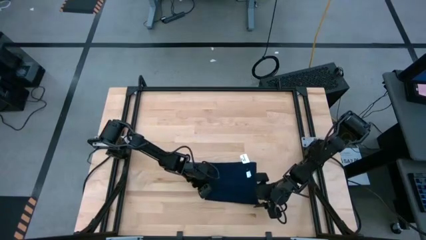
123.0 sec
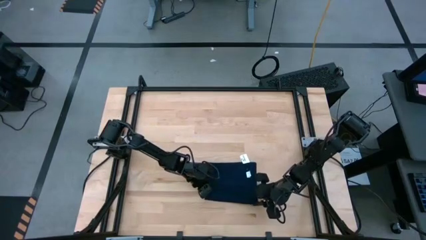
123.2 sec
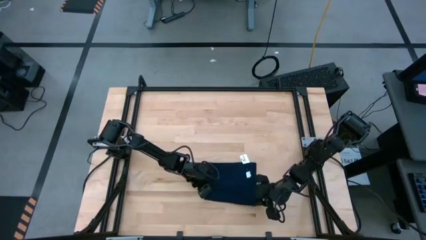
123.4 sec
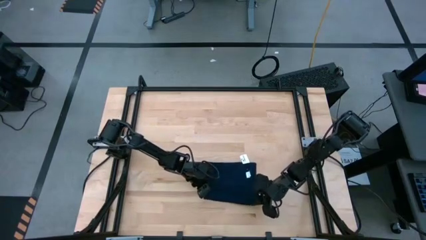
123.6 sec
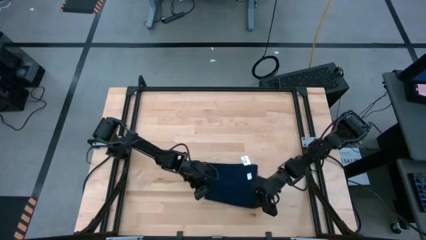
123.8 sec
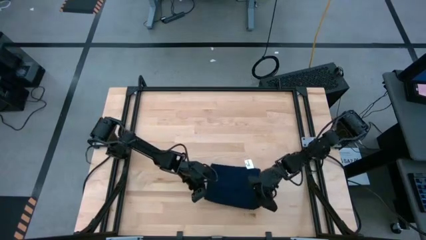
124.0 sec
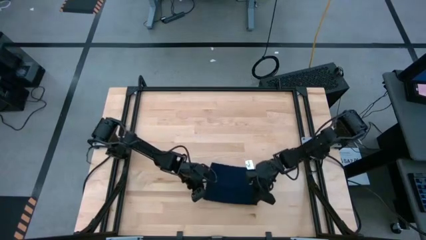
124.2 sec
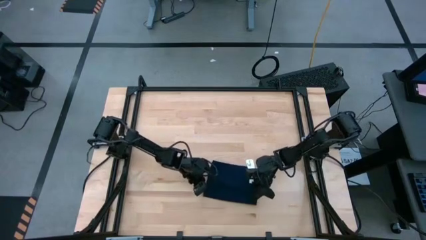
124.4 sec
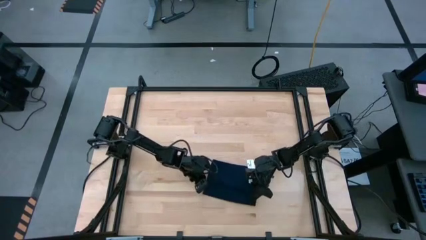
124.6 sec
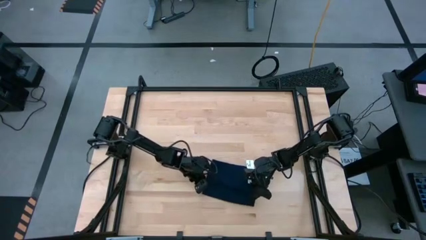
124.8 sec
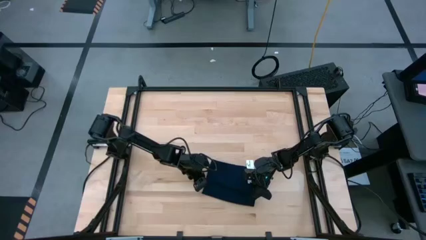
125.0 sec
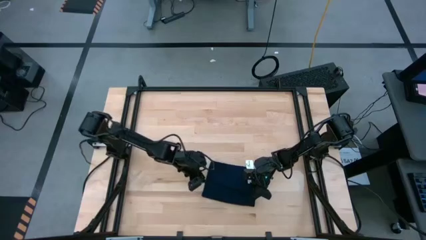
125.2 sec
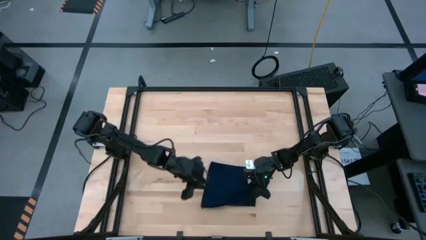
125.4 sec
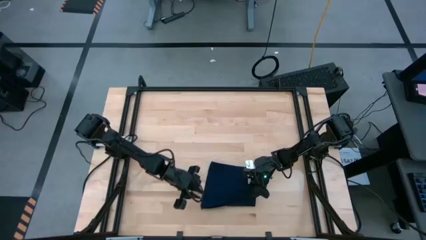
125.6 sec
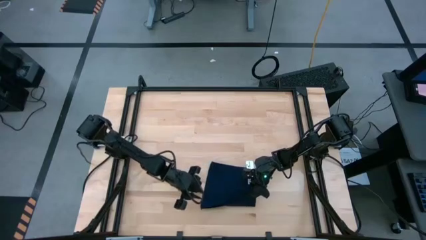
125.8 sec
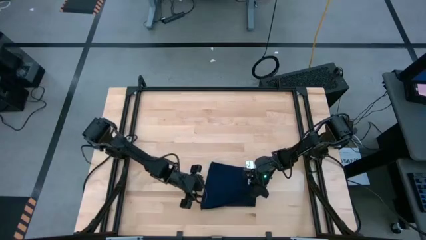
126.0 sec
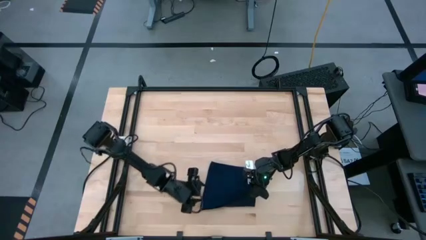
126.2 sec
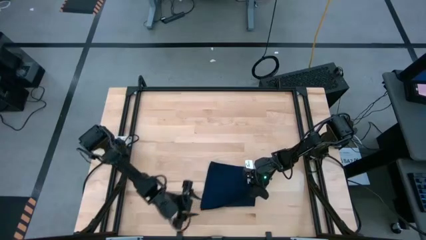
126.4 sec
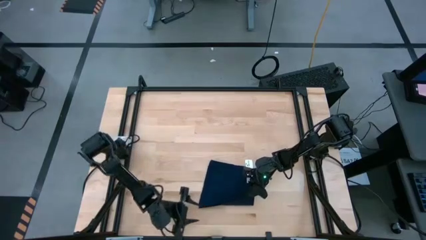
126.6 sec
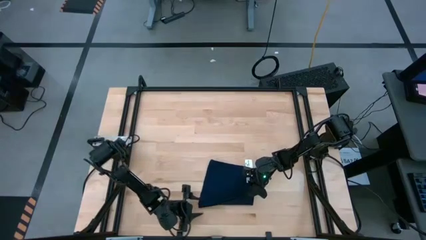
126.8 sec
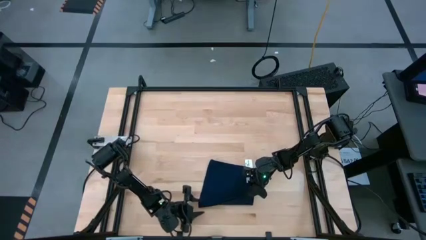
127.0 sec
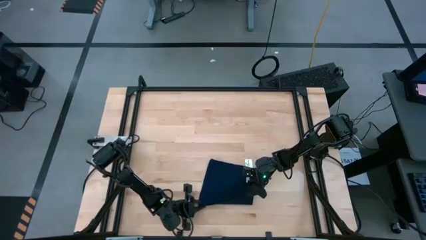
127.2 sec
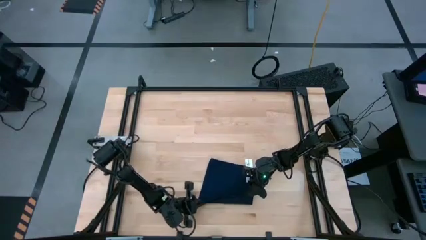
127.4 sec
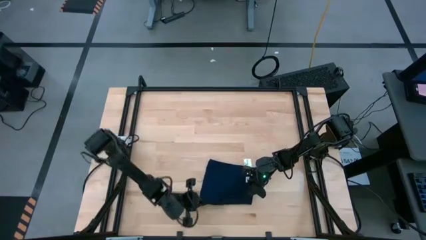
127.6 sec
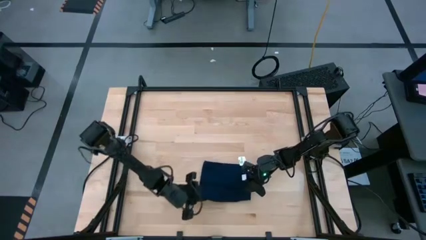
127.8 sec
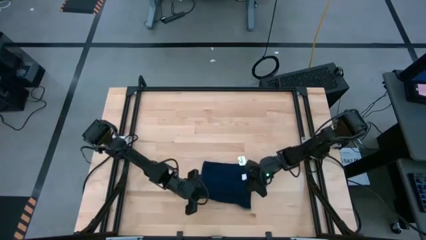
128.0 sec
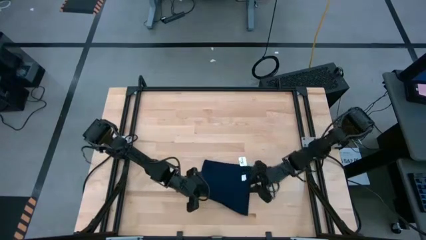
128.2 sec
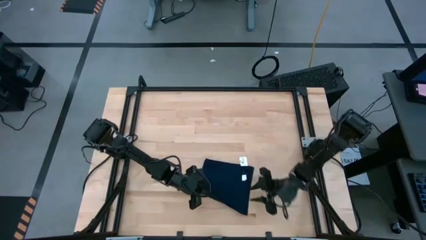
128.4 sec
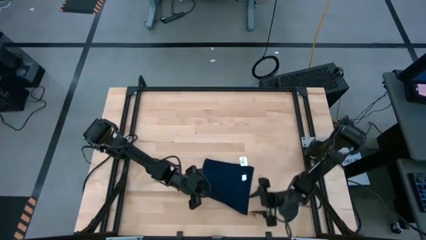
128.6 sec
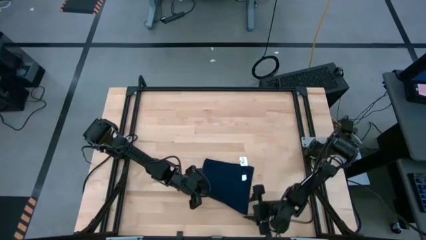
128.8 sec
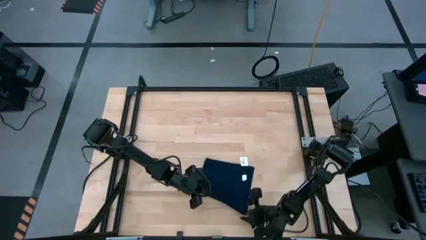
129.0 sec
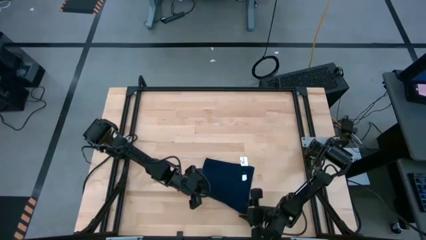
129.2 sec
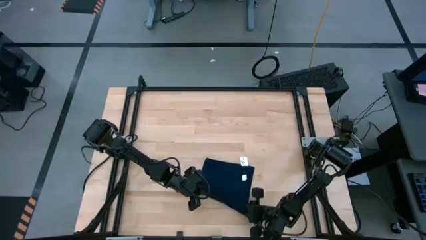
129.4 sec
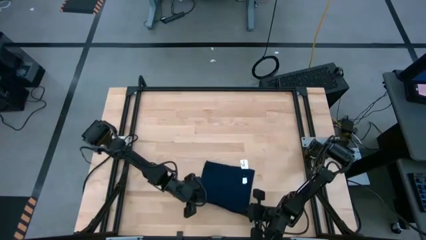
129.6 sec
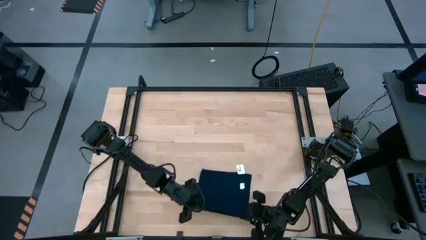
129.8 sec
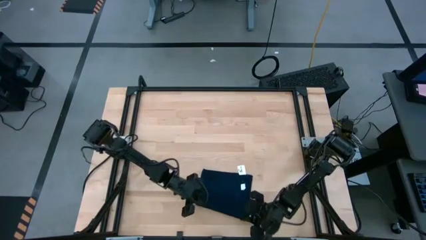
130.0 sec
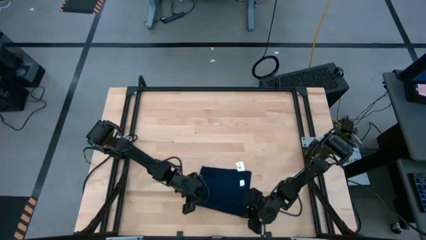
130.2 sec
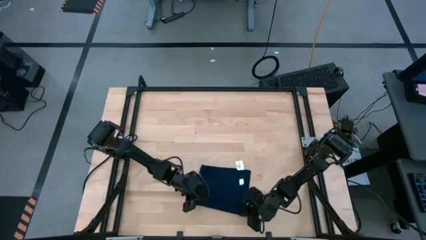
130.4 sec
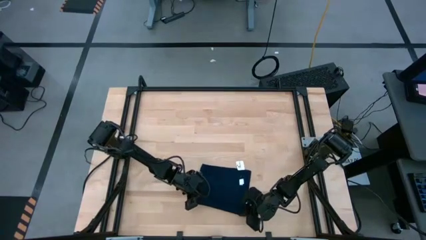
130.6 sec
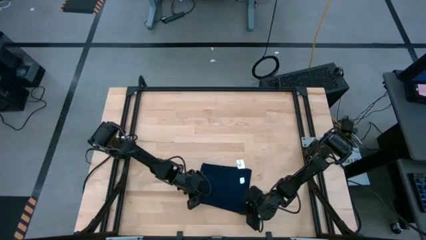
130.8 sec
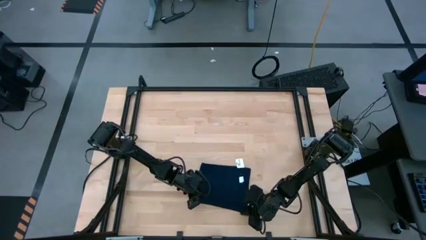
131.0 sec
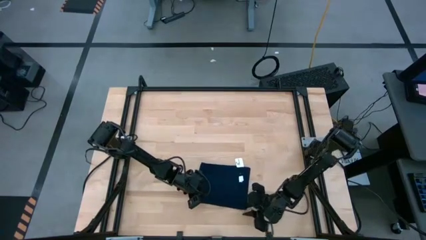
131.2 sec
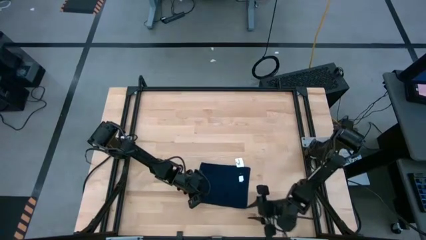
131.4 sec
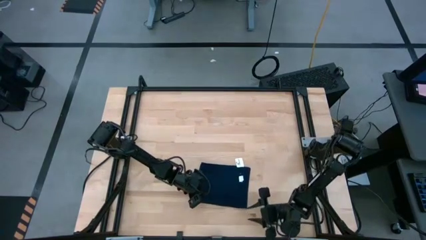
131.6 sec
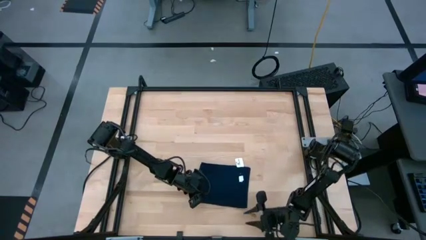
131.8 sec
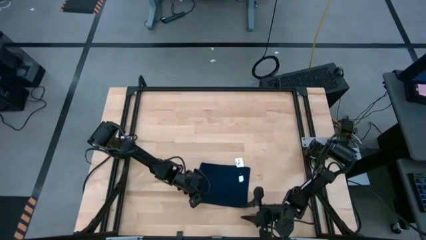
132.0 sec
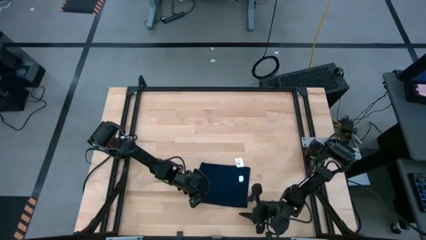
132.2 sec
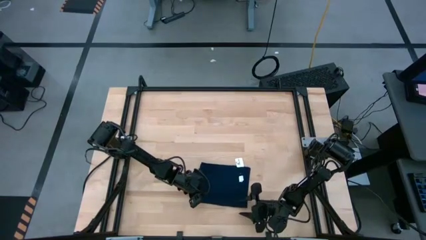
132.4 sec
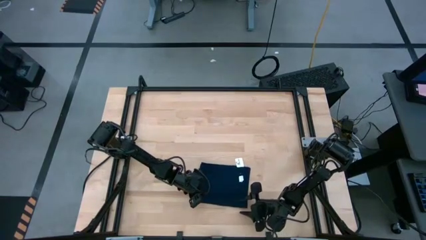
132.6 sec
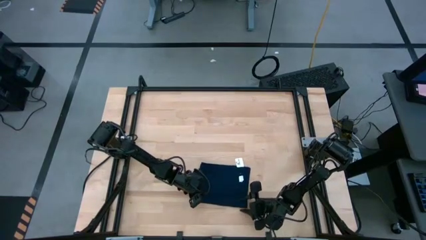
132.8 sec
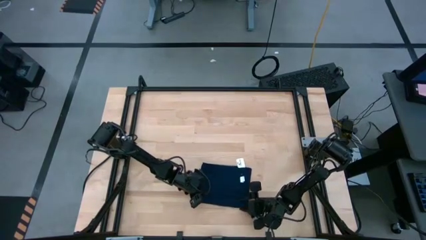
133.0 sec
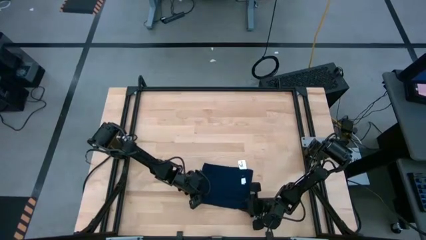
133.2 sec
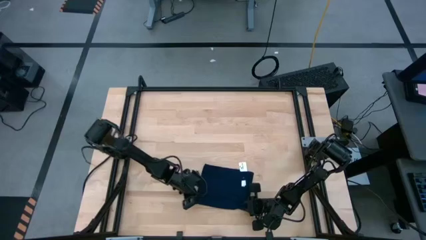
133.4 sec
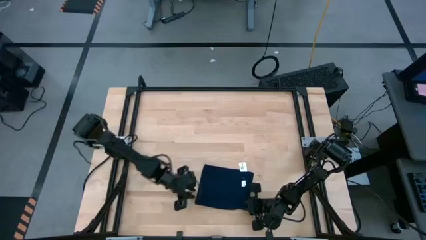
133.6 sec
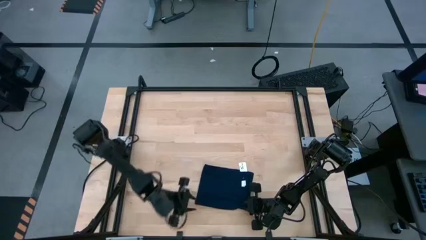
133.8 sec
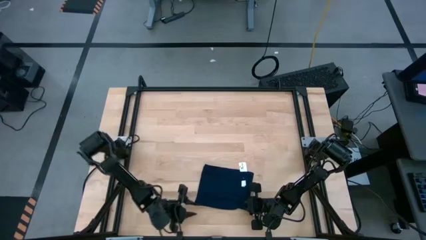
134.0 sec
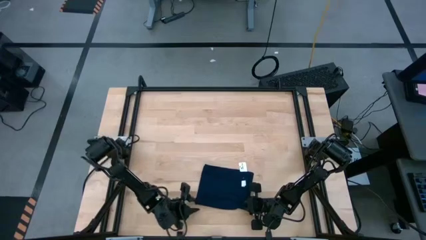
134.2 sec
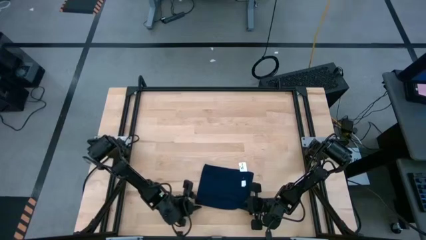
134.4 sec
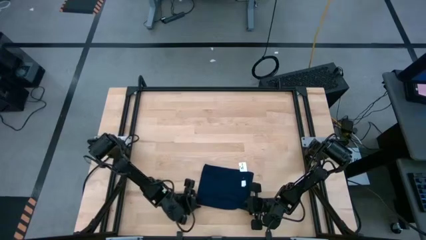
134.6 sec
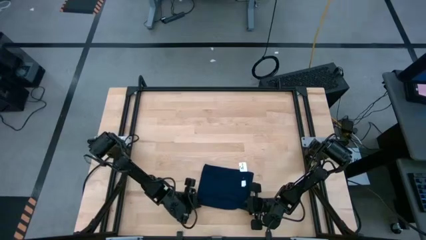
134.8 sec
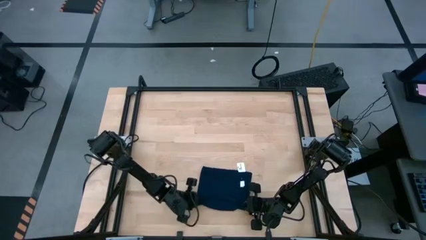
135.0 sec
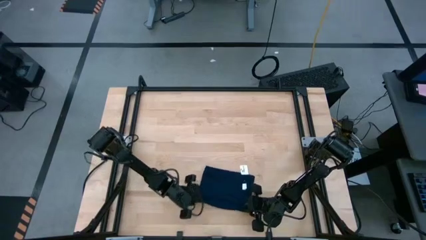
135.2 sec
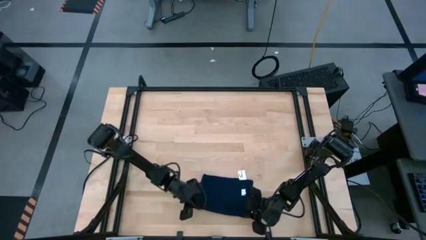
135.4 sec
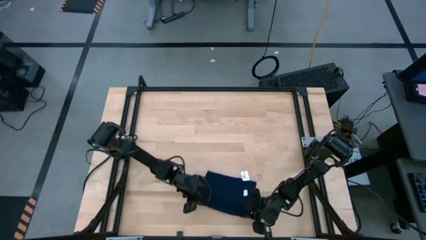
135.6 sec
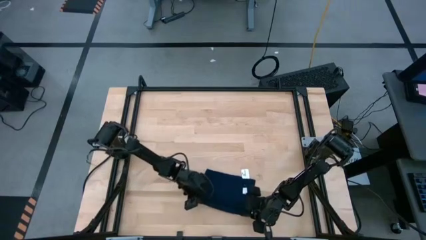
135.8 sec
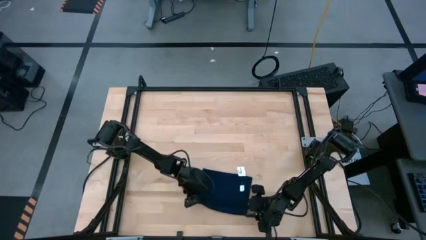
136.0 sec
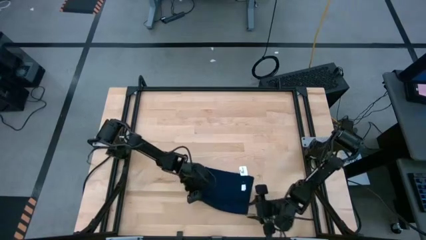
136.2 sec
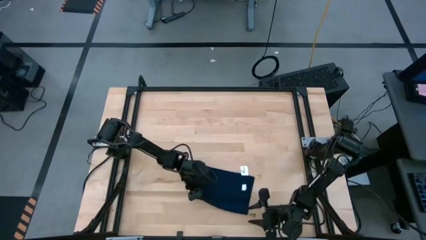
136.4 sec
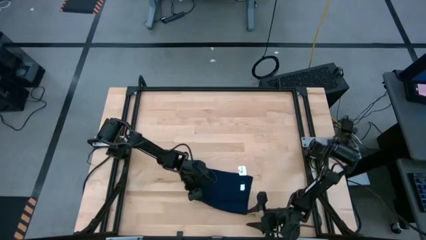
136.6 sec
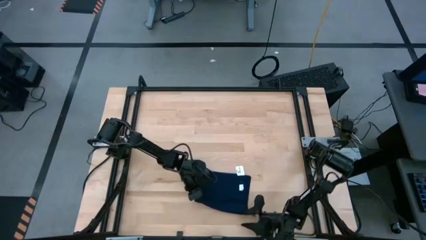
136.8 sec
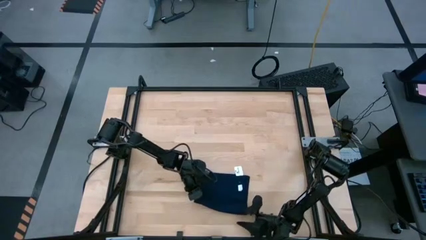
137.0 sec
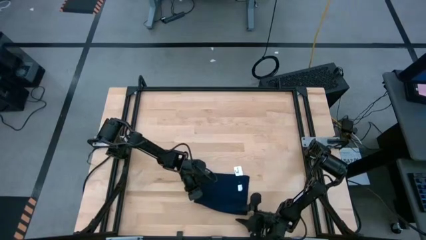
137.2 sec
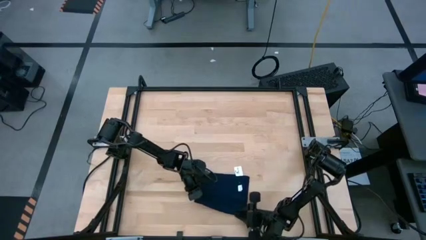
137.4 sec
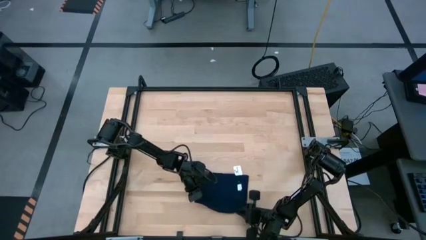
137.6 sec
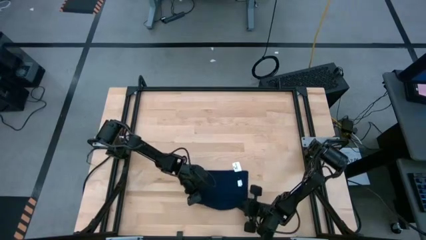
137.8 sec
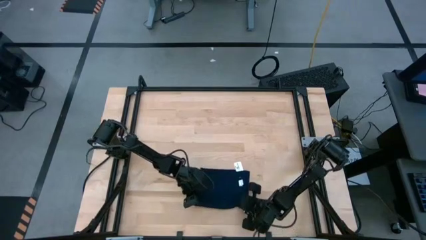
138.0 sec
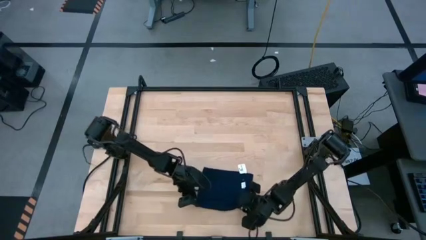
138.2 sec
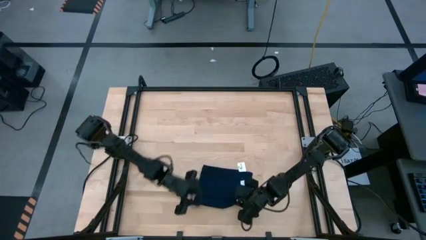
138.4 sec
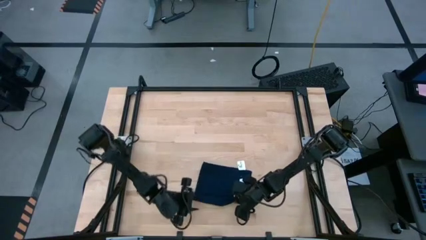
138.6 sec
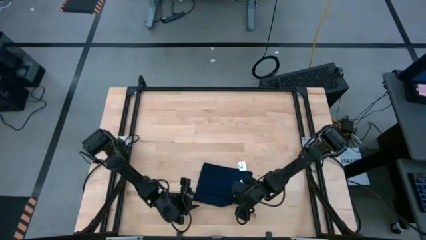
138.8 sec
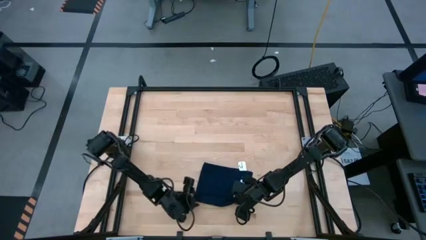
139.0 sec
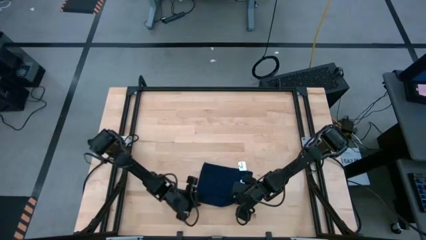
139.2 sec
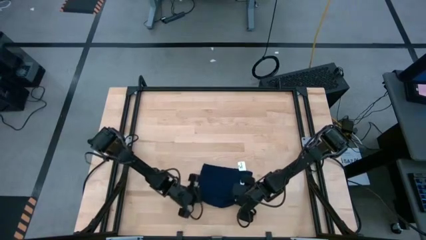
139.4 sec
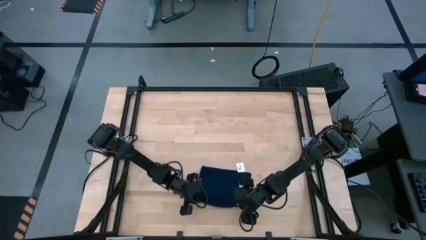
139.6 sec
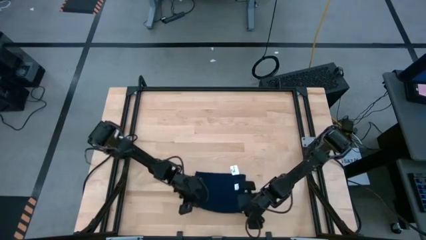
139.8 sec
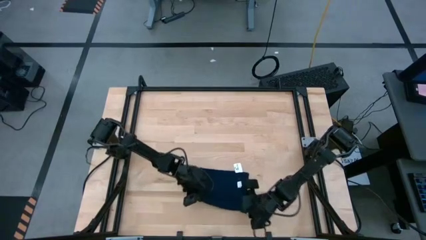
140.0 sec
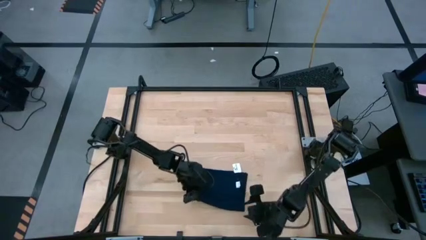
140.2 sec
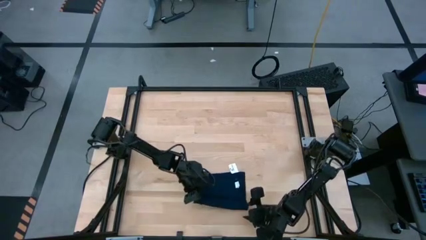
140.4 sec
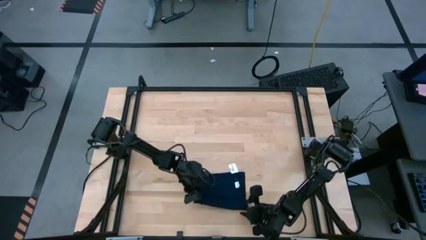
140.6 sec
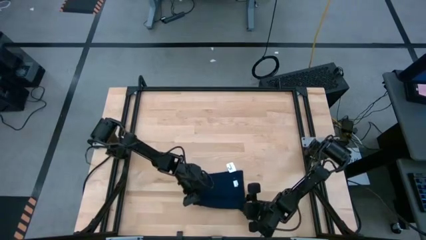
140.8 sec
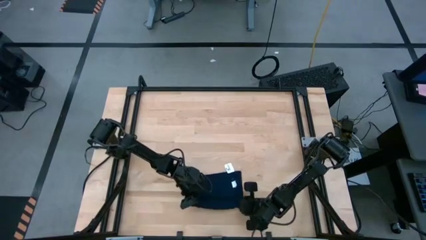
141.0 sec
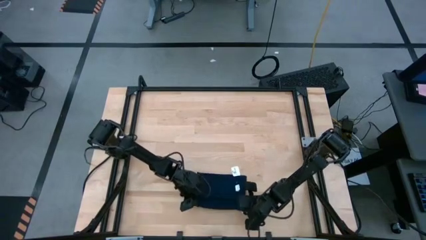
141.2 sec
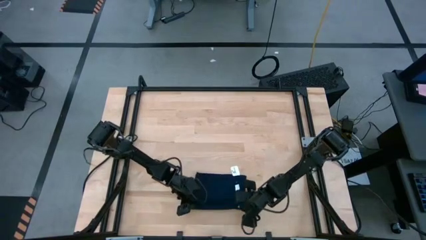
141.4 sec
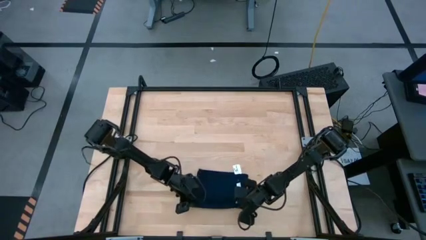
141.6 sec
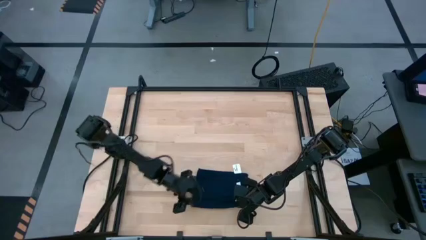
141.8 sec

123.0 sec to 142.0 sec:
Task: Roll towel into tight, uniform cylinder
Roll the blue cloth napkin
